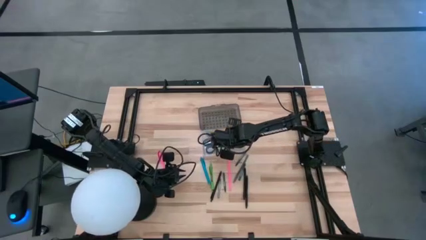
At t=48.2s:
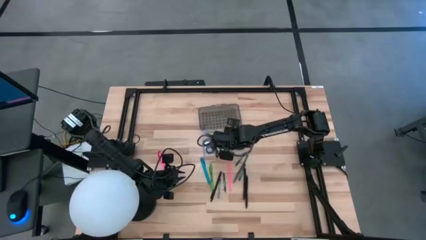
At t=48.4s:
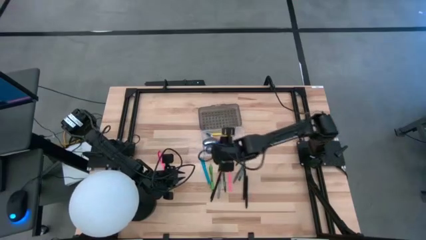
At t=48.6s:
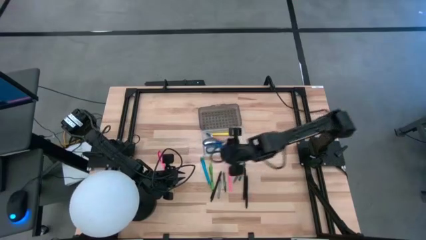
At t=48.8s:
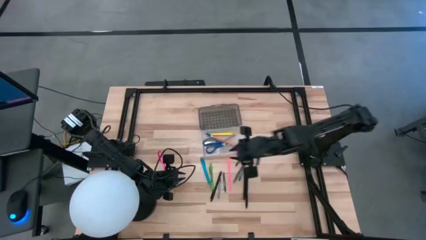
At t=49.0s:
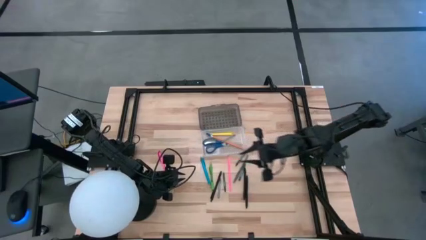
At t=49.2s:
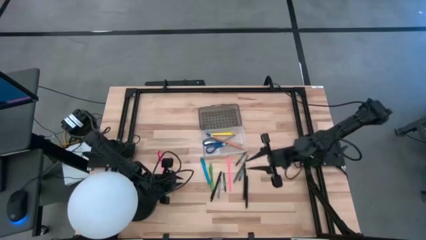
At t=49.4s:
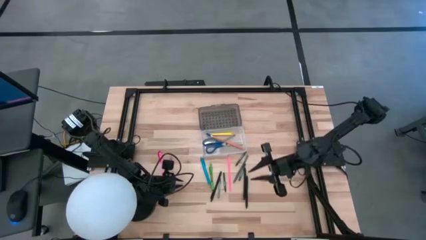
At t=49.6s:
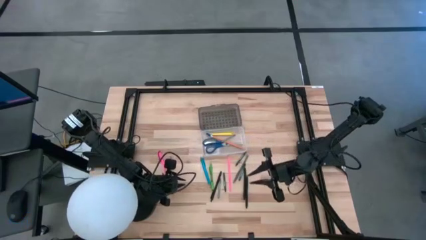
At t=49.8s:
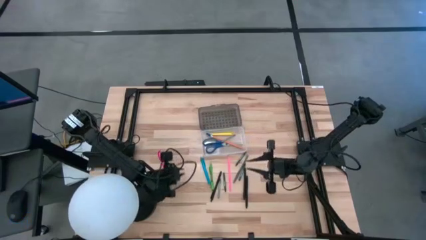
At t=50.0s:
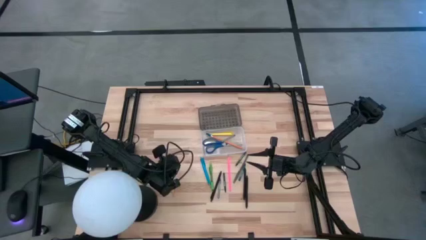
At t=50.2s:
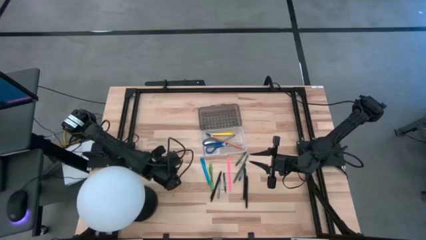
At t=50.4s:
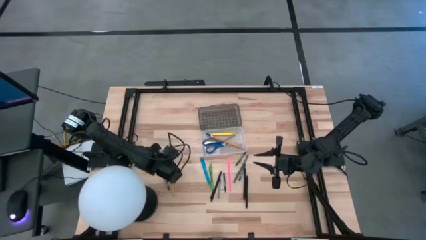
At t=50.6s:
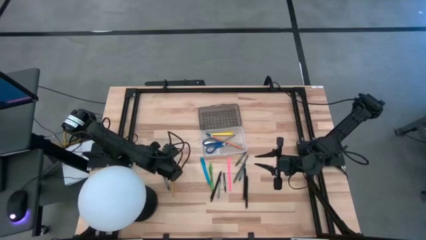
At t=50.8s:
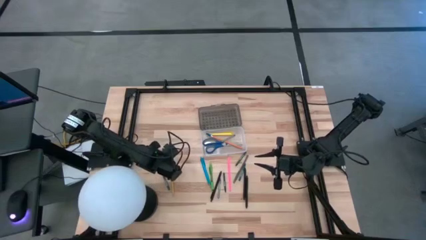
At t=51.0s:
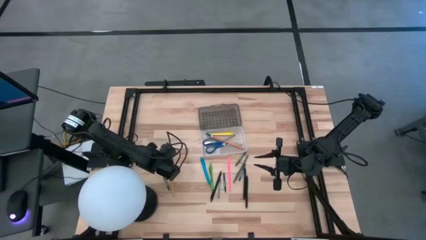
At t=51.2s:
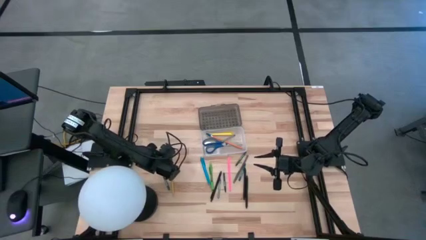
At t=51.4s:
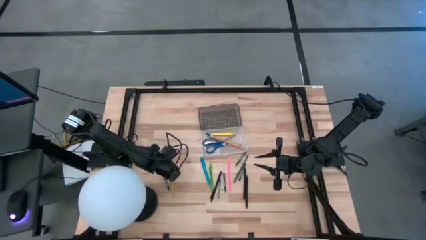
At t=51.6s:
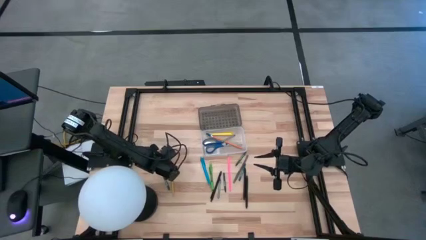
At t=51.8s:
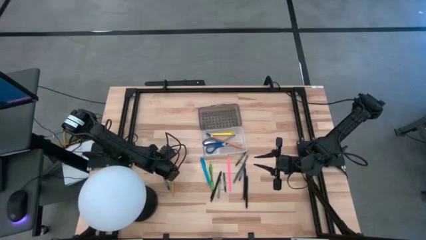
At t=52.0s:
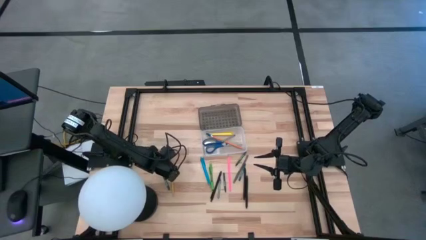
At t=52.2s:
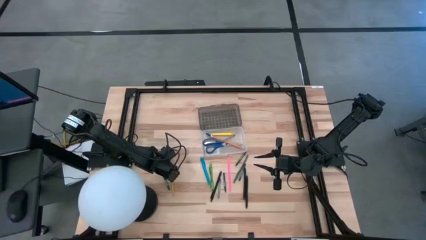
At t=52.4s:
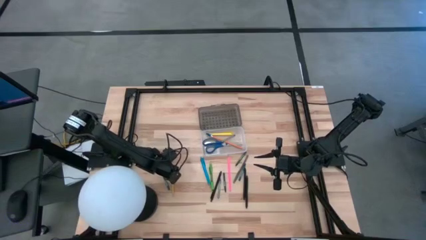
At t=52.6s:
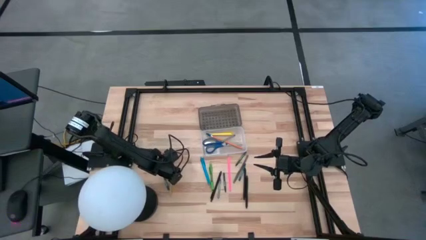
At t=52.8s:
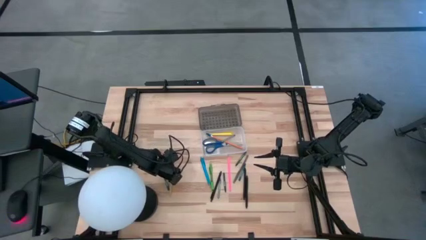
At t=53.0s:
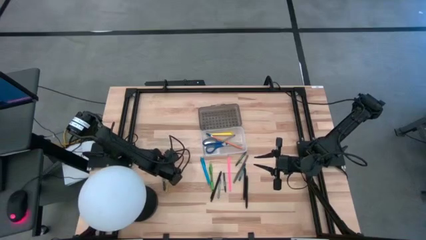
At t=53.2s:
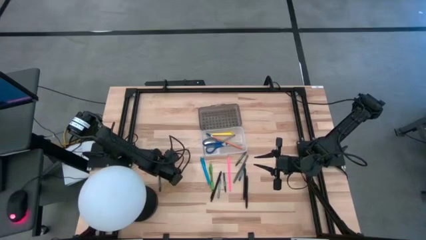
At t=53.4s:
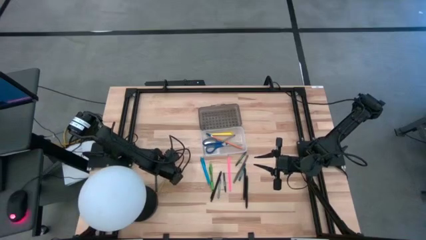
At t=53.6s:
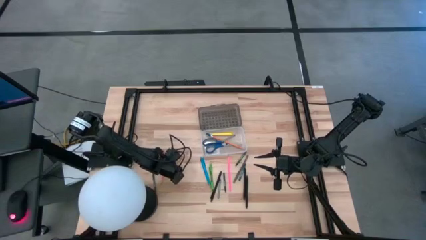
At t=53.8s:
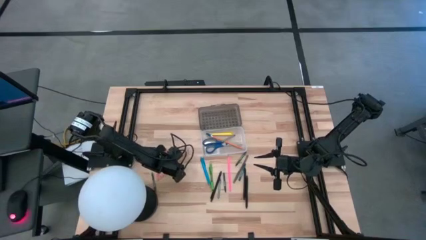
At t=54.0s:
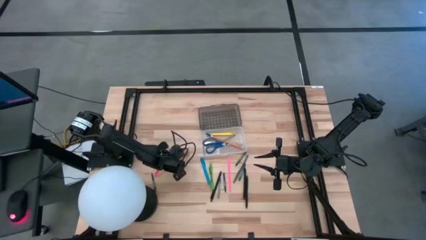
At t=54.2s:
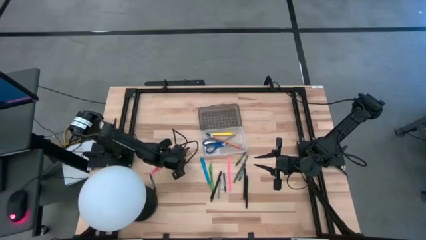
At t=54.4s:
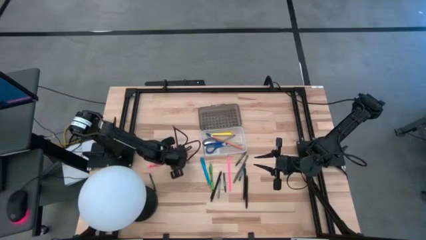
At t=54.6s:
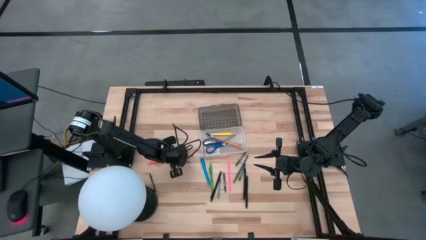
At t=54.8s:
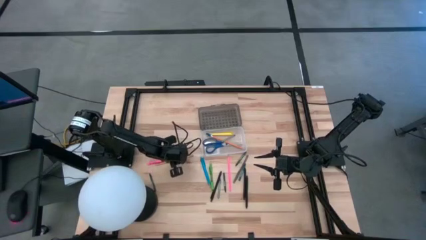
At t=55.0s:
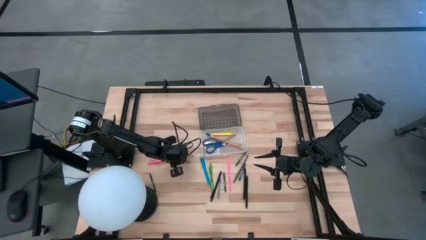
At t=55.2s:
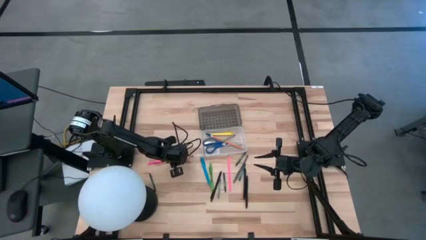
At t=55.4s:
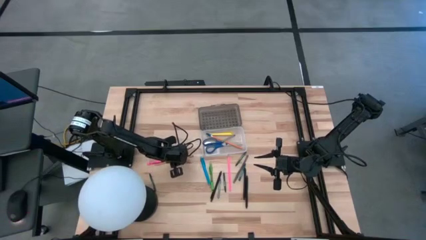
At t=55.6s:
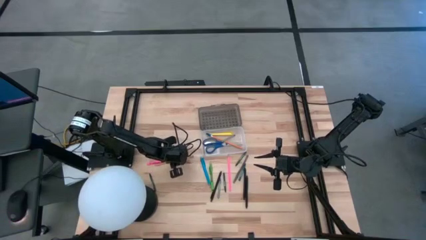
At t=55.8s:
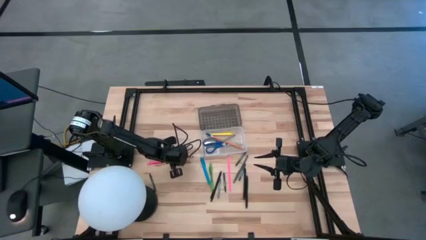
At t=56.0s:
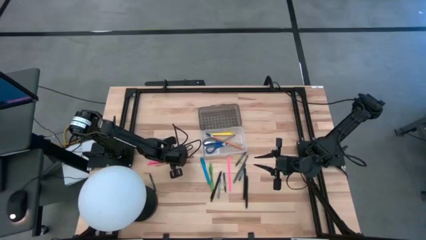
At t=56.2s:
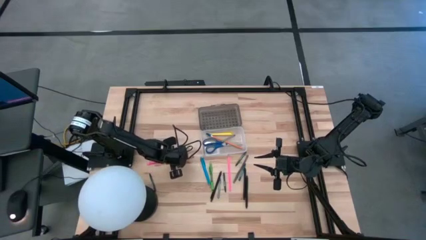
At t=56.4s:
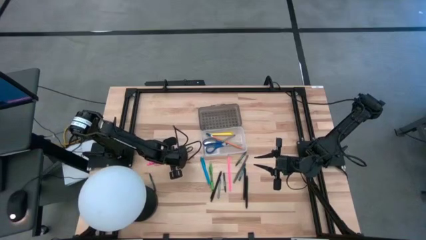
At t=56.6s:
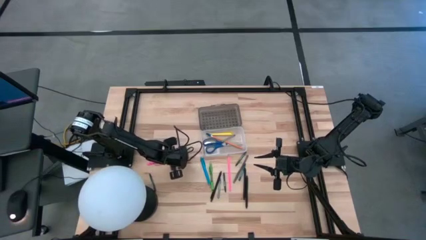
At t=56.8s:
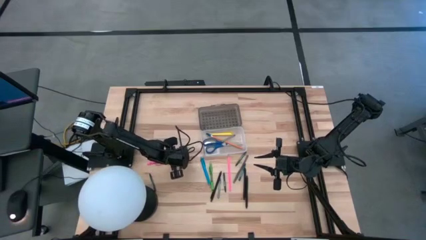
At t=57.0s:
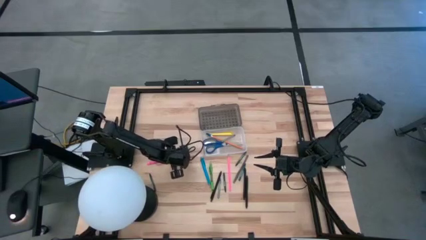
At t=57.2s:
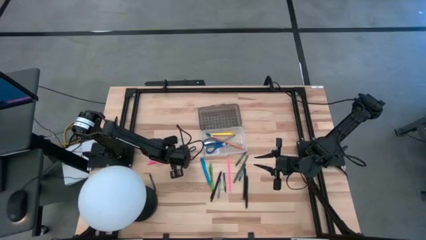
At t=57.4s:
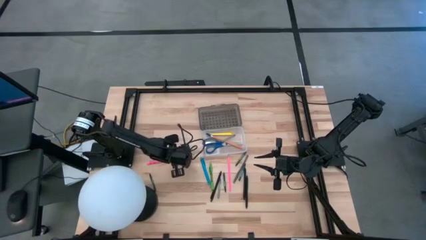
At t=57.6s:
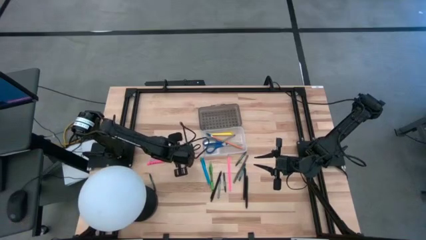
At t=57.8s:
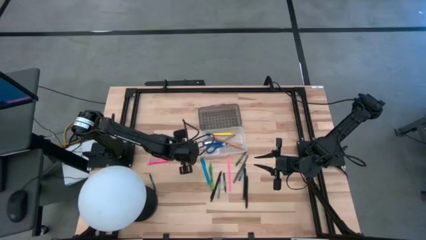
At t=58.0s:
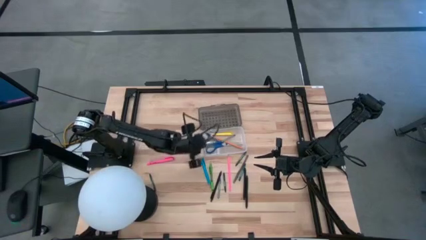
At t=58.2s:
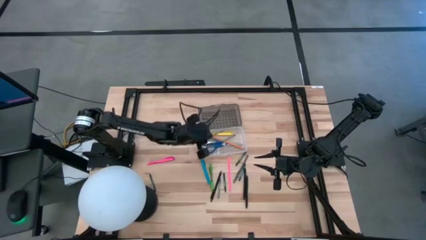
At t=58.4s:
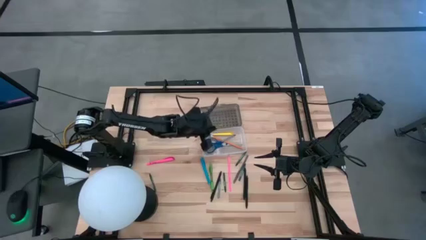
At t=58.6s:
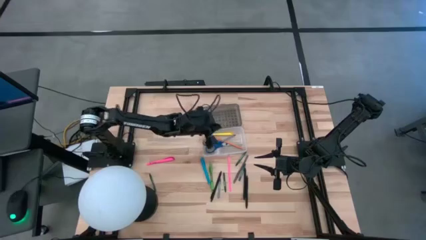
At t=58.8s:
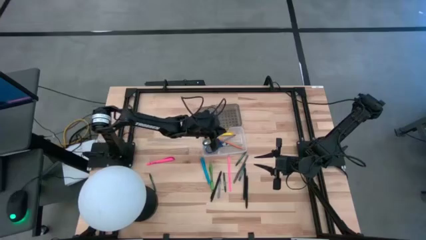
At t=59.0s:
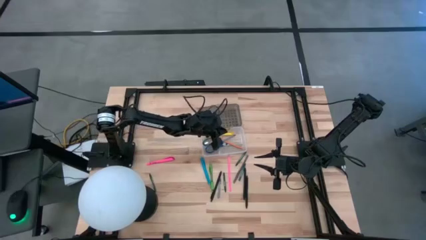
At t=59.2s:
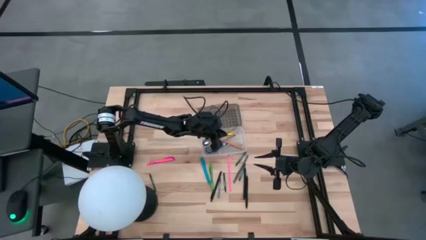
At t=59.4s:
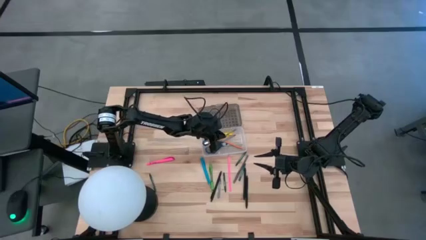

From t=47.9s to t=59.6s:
Task: Pick & place school supplies into a supply box
Put the yellow pencil into the supply box

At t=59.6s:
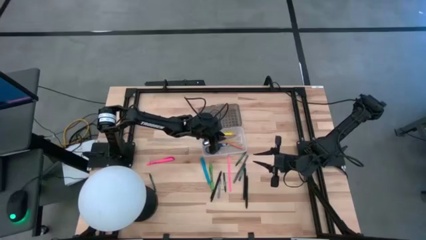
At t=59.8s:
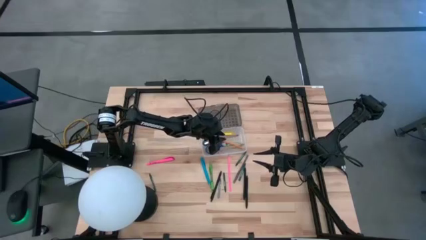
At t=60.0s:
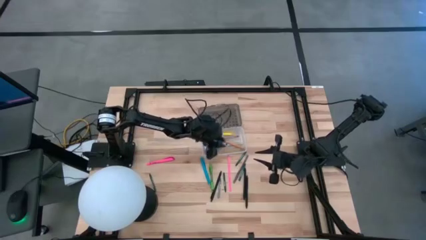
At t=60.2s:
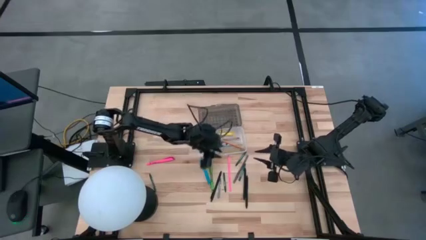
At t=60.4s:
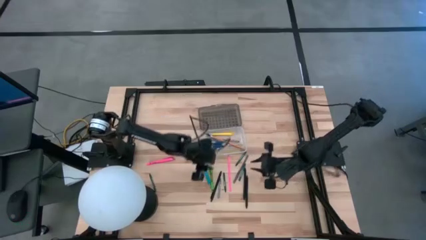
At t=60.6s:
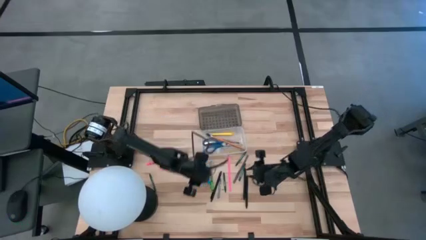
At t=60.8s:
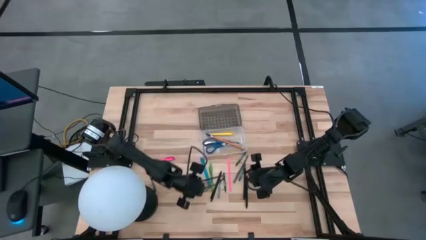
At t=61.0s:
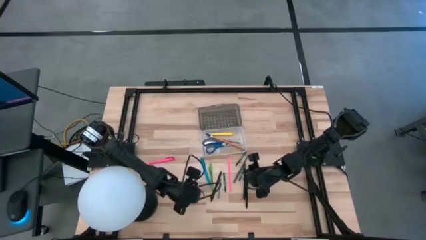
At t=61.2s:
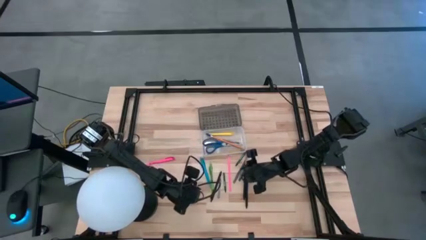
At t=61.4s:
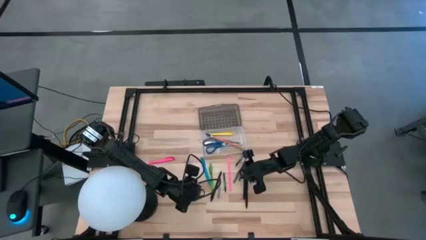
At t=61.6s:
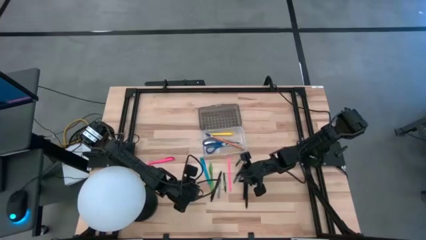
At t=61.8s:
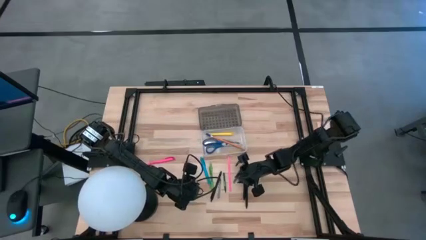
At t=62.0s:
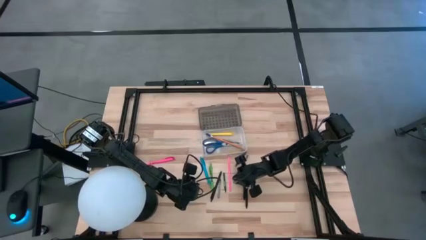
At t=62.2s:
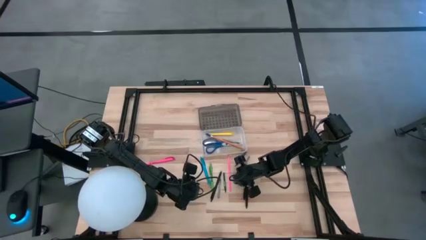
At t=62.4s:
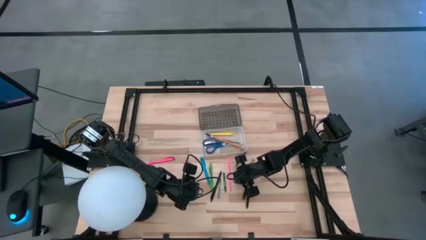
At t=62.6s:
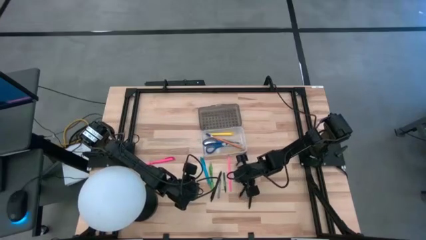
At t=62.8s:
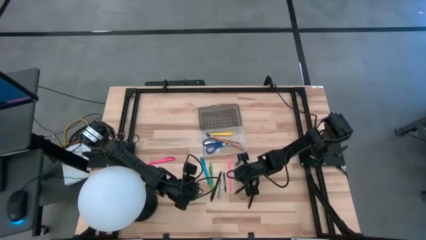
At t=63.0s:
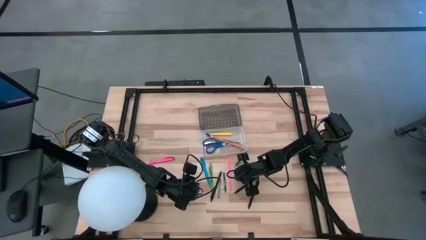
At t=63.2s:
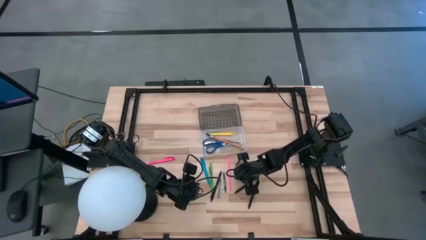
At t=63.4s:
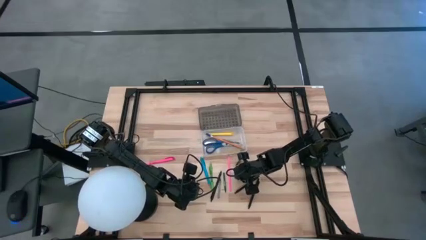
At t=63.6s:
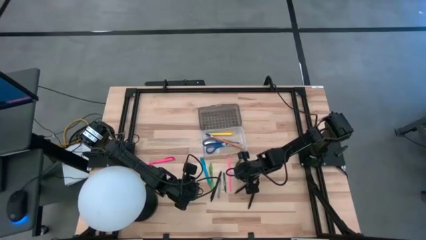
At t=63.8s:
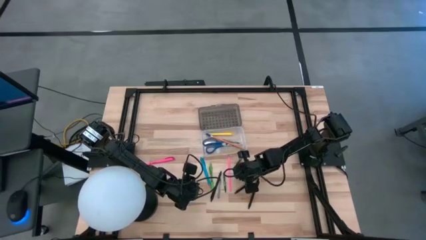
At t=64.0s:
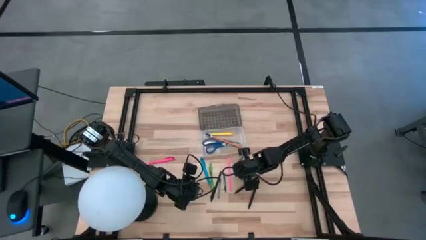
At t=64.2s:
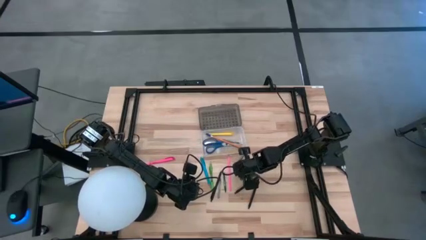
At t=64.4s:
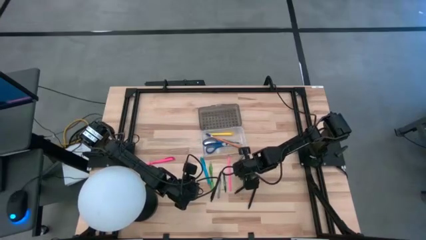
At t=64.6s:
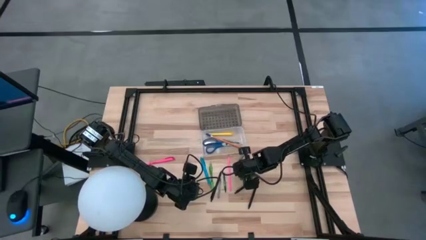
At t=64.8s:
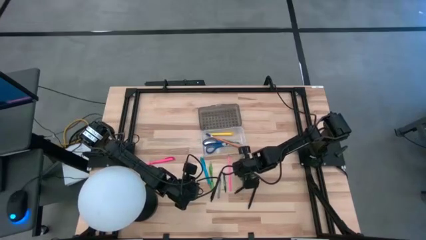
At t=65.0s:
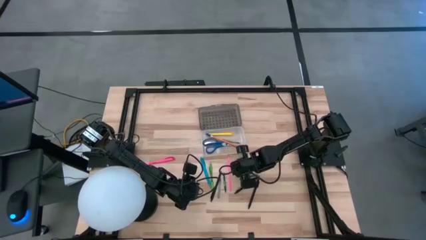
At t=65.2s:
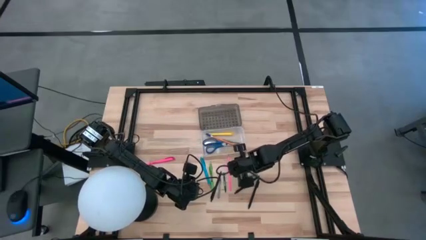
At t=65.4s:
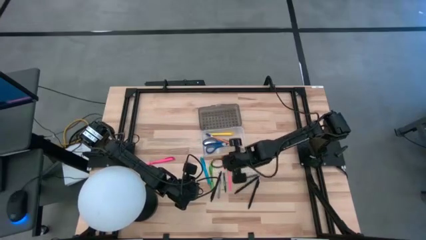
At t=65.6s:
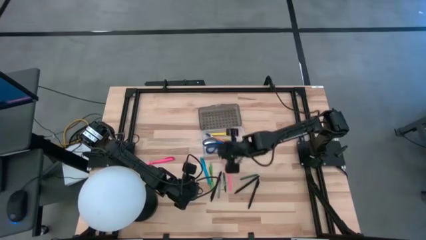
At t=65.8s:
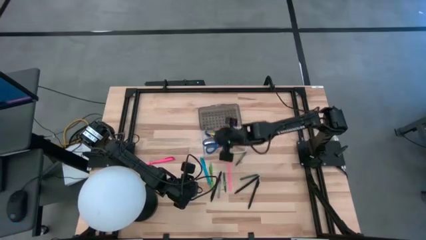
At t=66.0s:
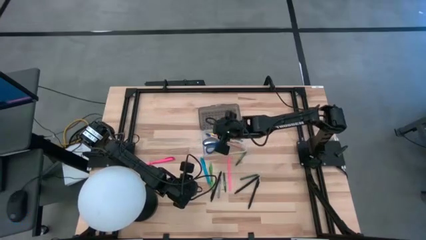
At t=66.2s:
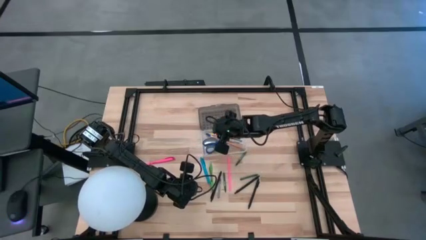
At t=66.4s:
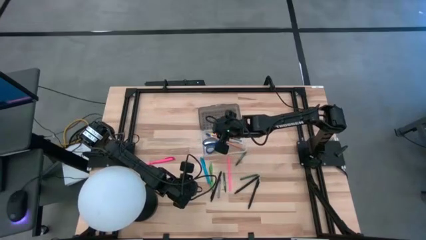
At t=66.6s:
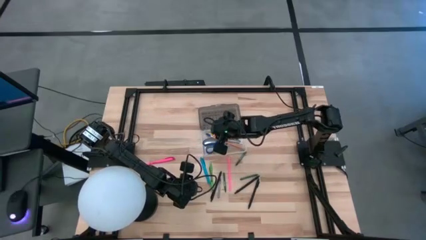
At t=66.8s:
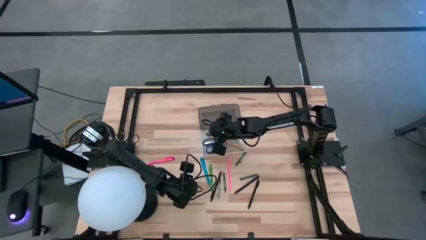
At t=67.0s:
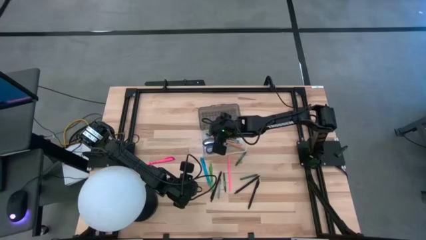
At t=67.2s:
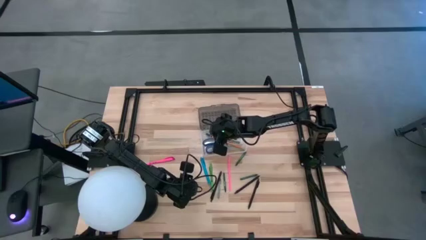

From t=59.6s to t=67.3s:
Put the gray pen into the supply box
